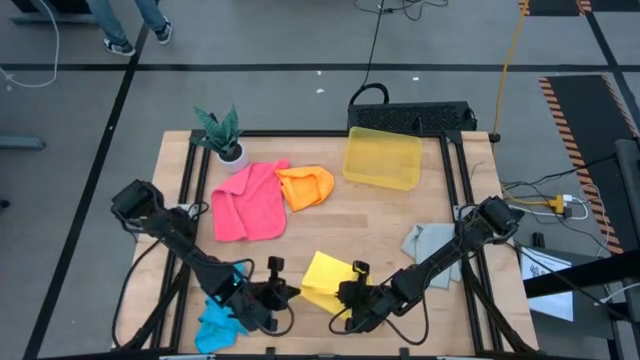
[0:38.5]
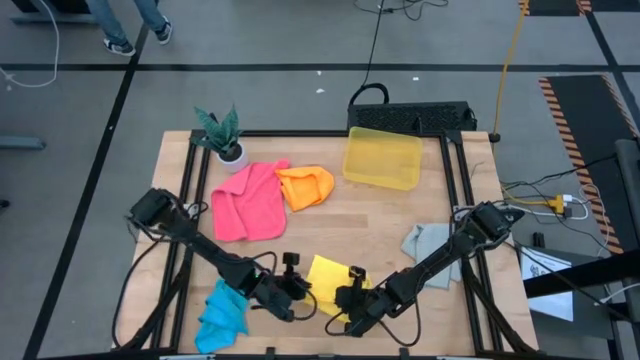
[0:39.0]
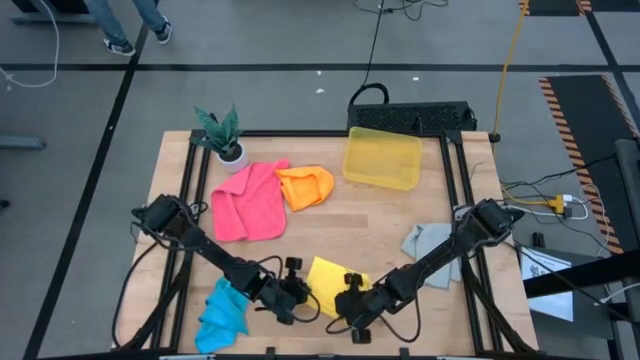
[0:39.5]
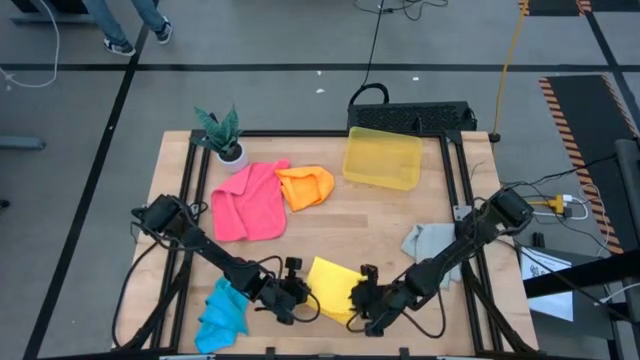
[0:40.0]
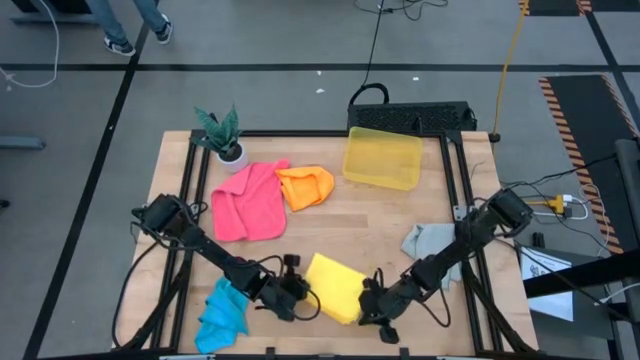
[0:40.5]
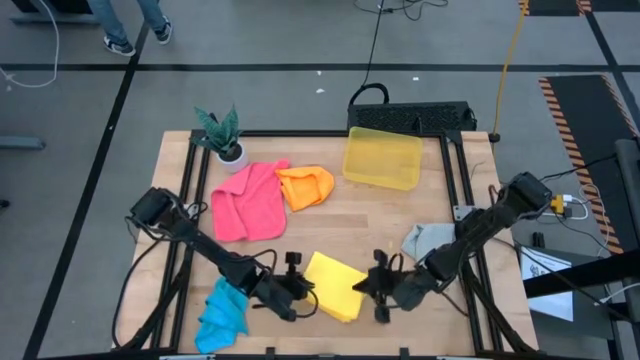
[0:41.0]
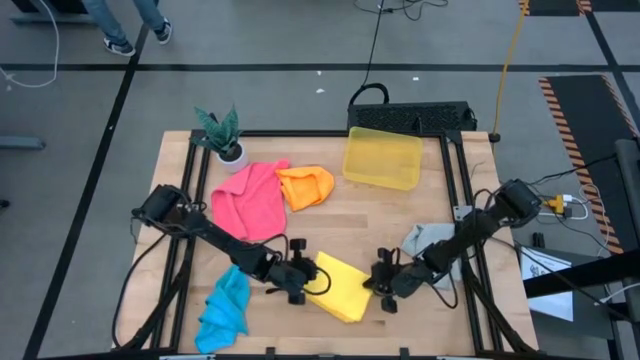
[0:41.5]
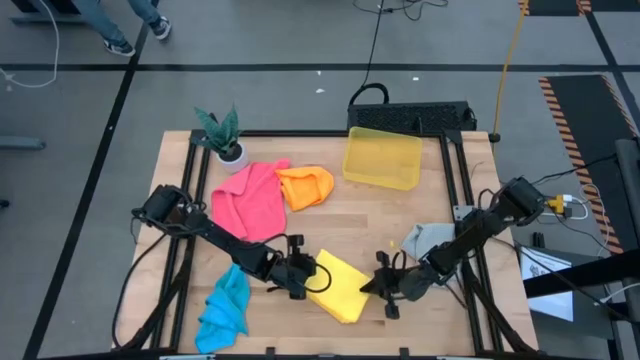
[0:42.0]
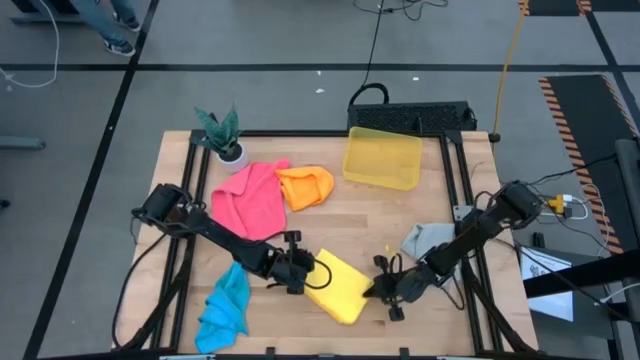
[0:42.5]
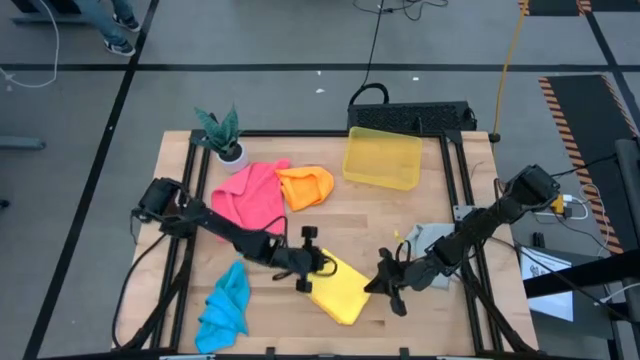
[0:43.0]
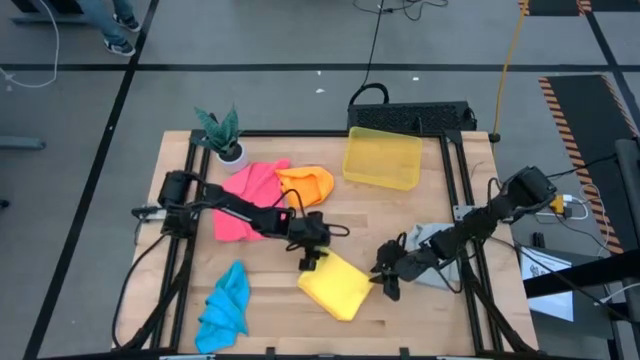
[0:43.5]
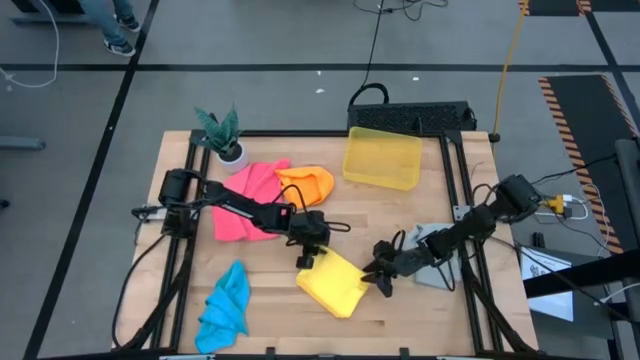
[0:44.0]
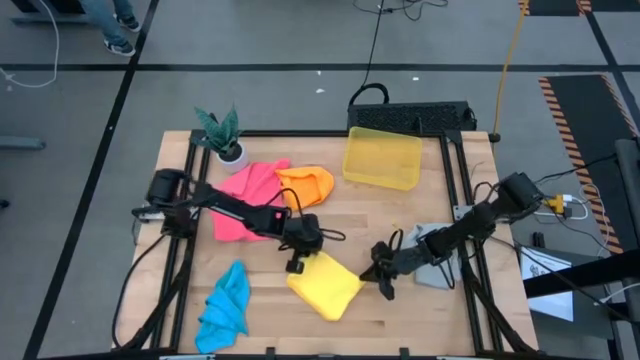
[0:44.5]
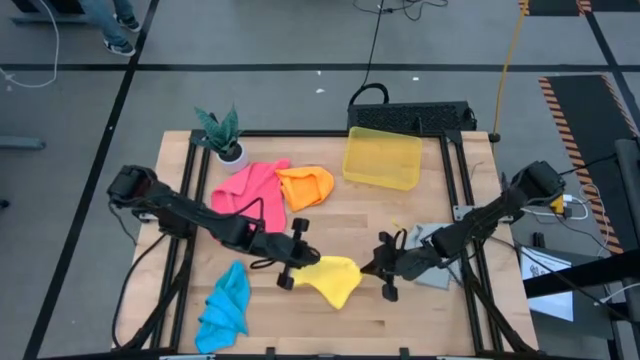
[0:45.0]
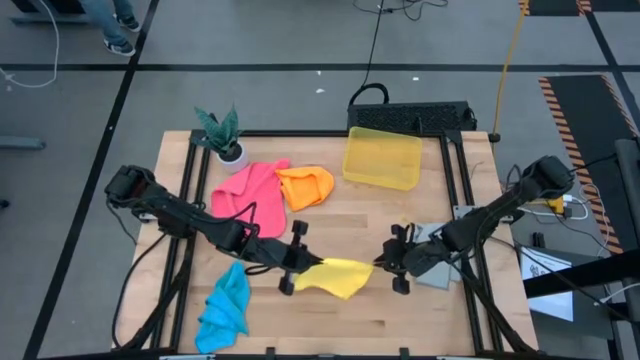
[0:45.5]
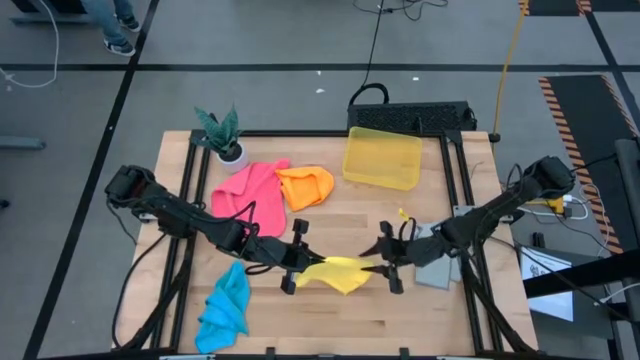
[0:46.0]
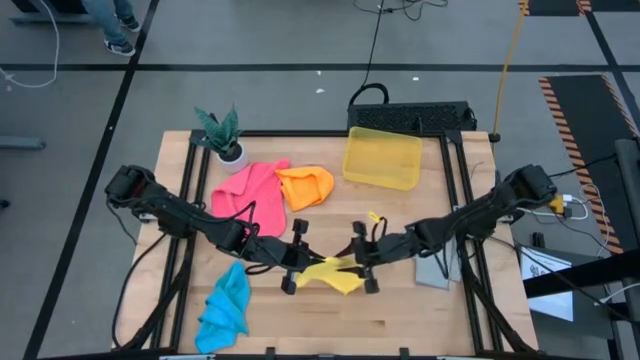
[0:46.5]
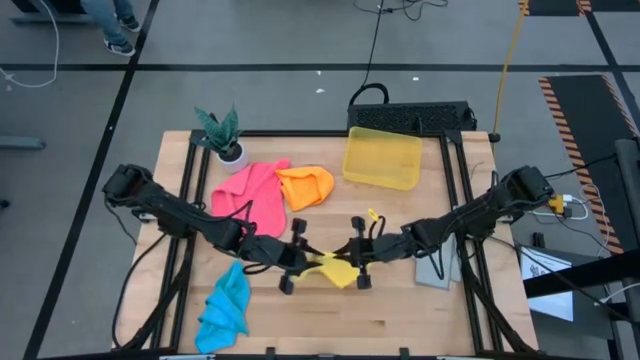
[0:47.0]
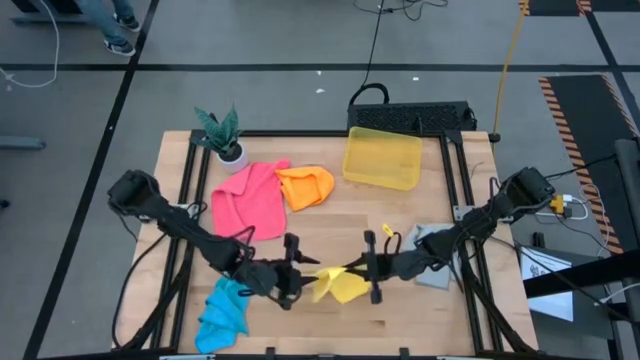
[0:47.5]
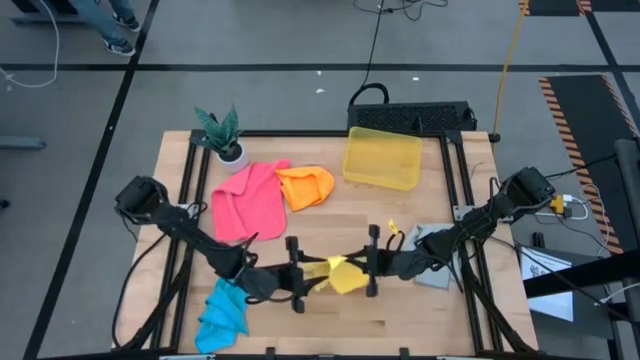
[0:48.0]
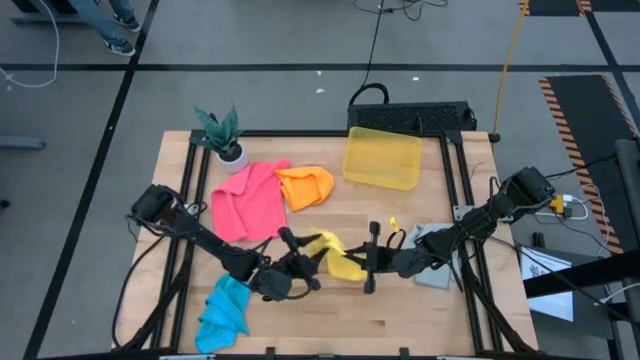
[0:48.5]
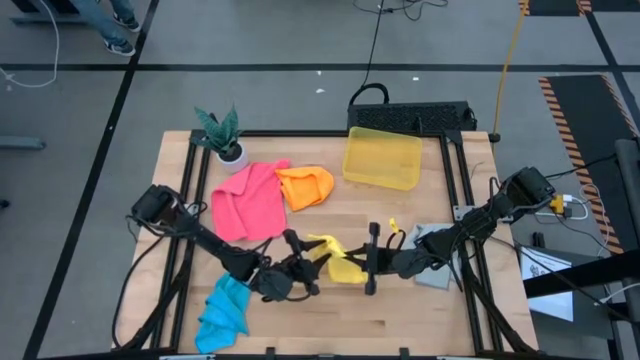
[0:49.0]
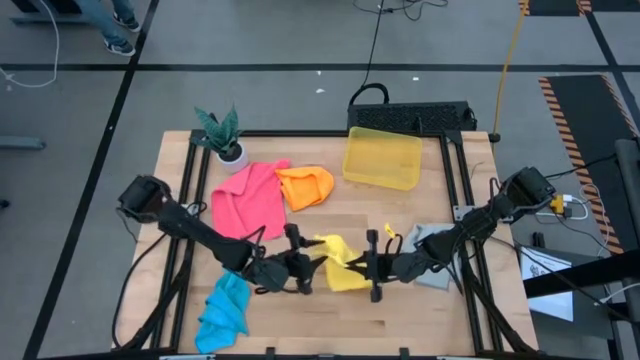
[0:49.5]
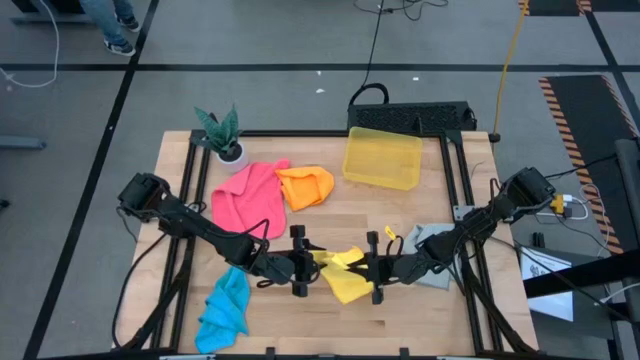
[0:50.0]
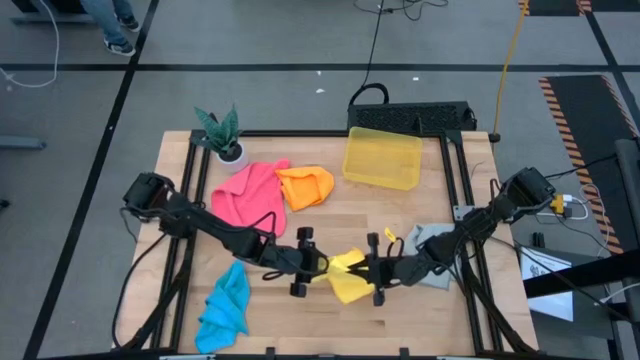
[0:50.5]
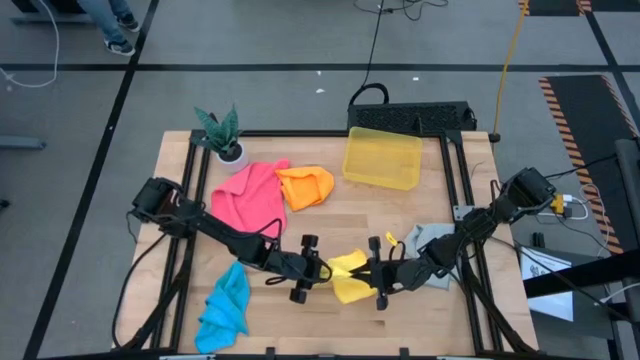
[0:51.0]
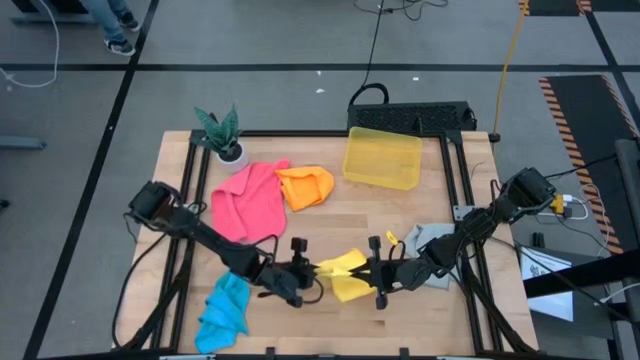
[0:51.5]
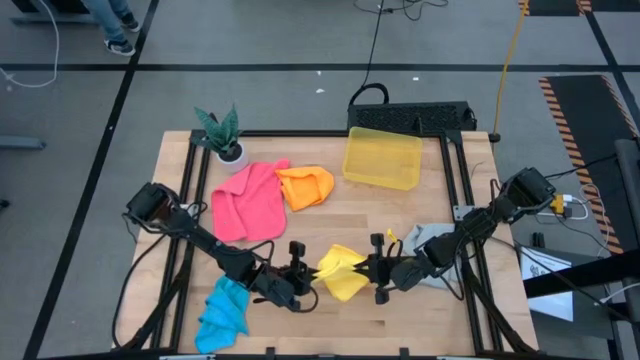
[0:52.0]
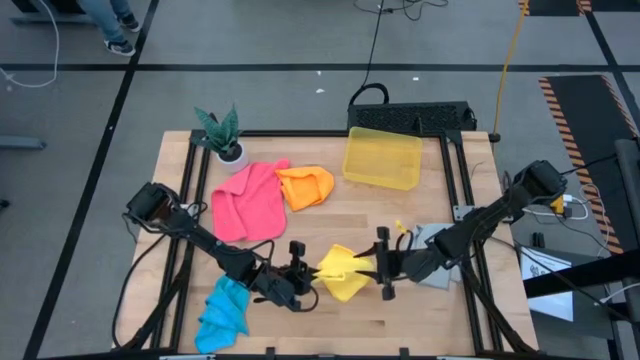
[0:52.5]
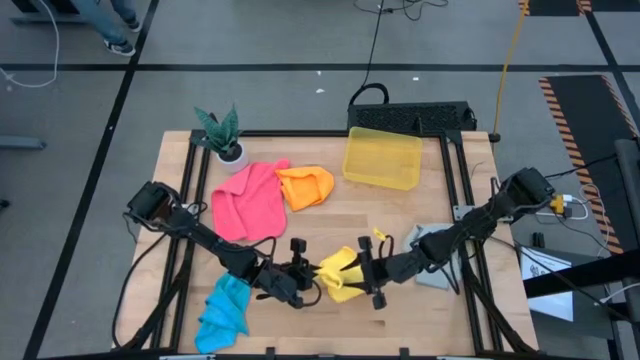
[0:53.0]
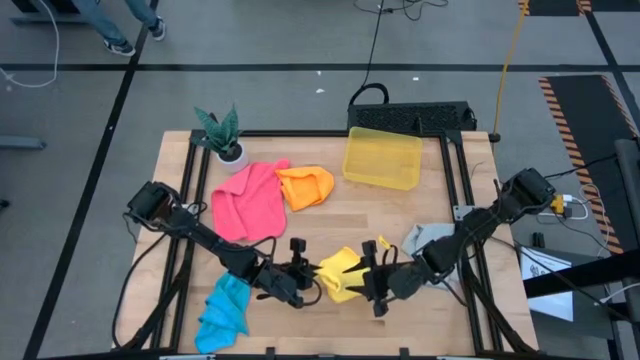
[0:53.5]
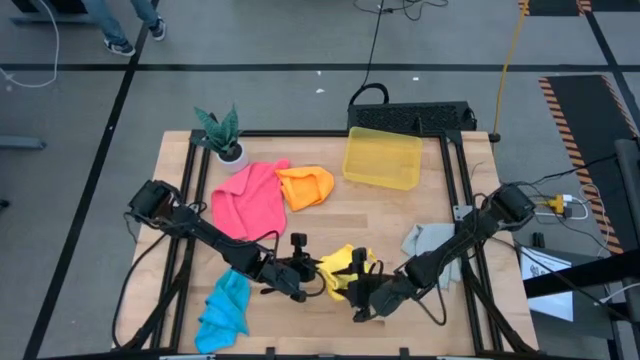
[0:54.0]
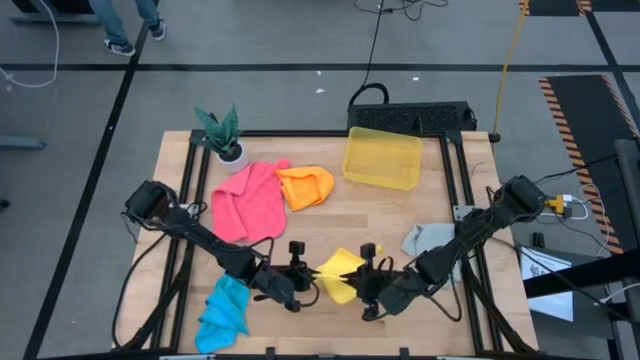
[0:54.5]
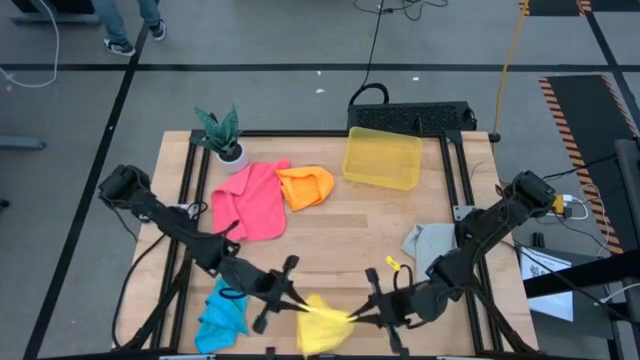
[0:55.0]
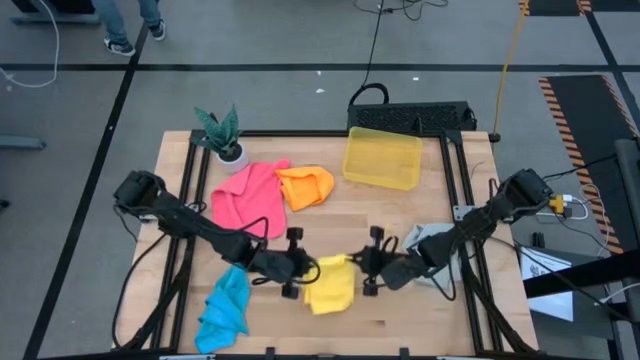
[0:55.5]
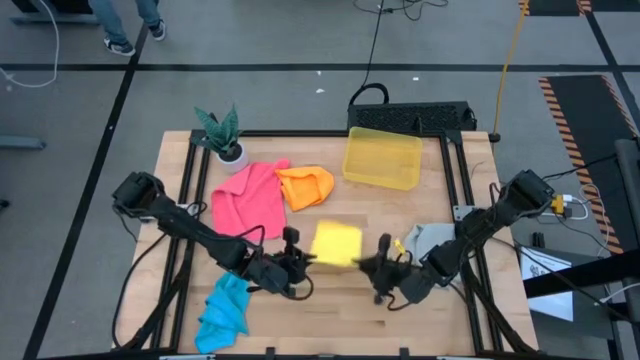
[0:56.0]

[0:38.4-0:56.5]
Task: Fold microfiber towels
Fold the yellow kitchen towel

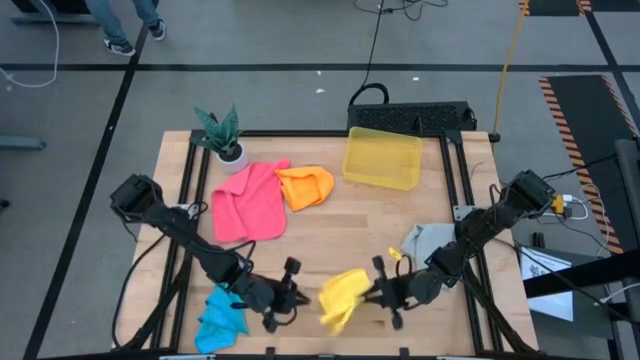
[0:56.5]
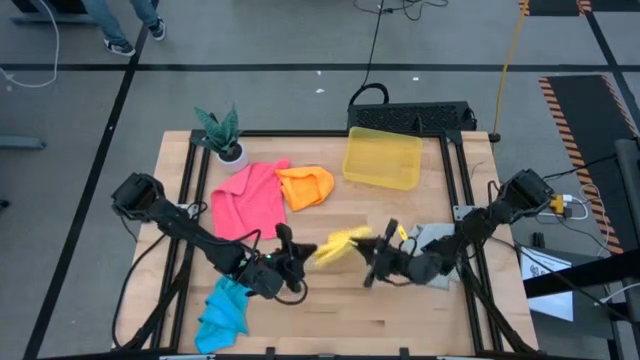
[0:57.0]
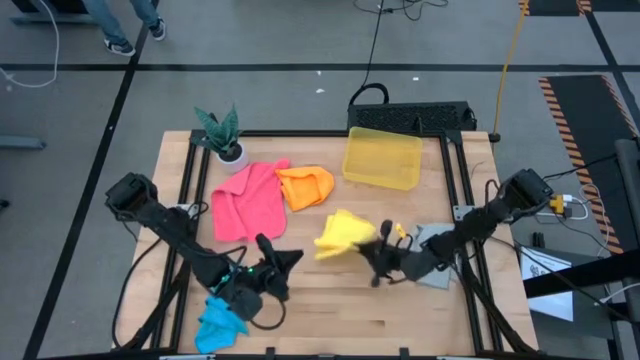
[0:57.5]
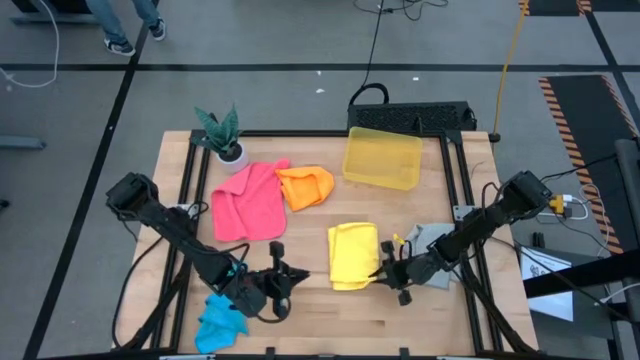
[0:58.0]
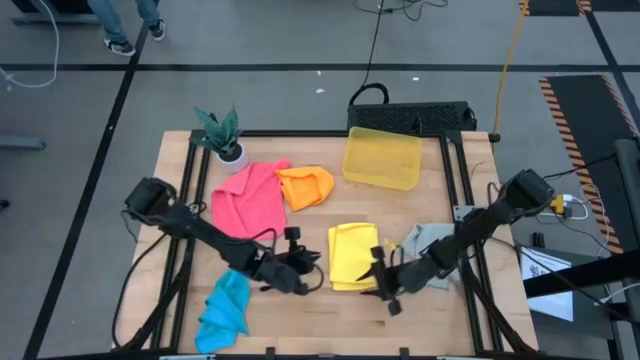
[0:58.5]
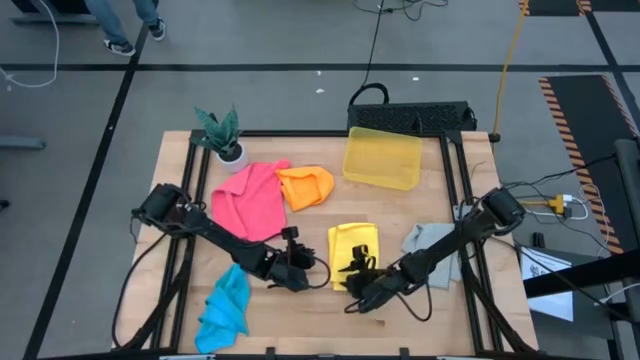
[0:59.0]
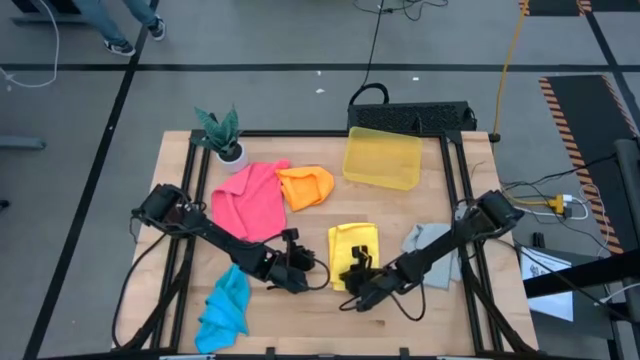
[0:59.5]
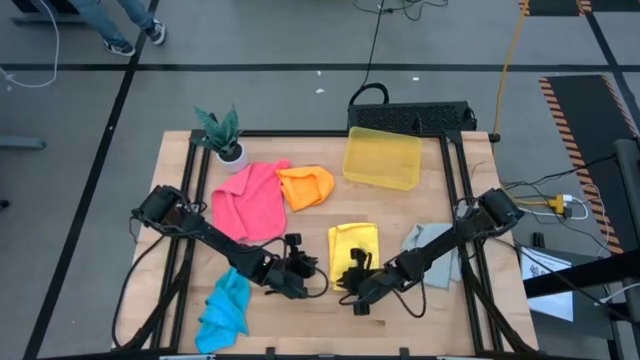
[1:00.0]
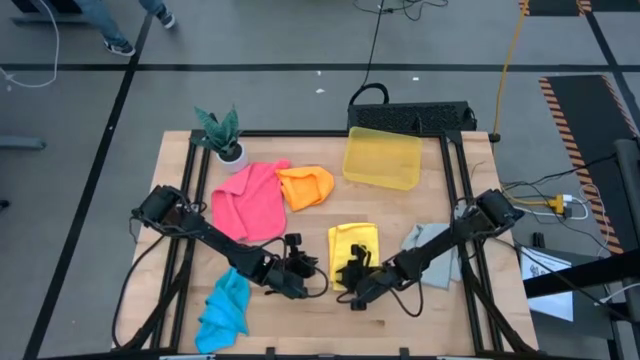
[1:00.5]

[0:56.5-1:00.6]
Fold the yellow kitchen towel
